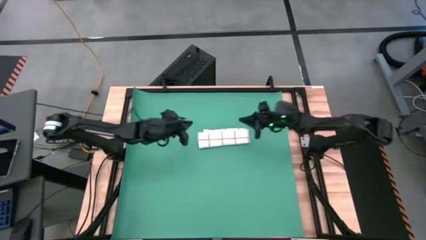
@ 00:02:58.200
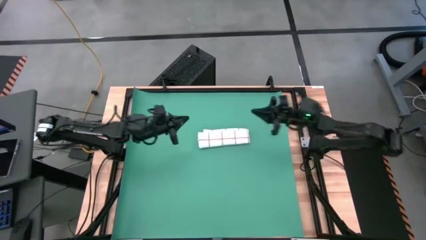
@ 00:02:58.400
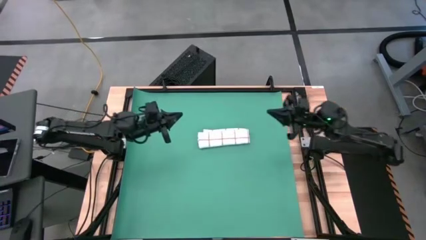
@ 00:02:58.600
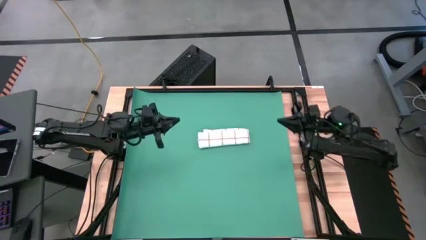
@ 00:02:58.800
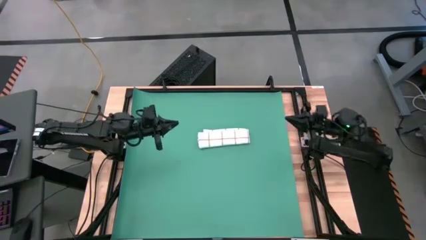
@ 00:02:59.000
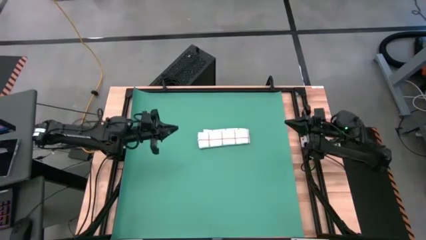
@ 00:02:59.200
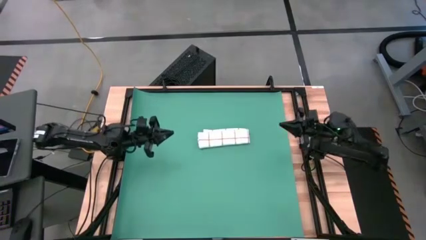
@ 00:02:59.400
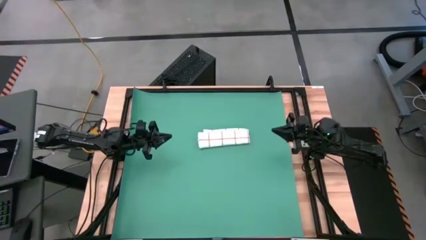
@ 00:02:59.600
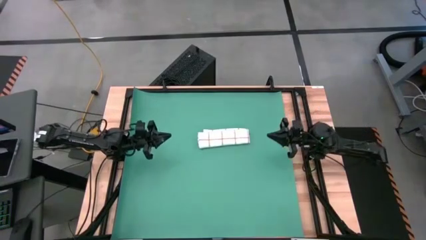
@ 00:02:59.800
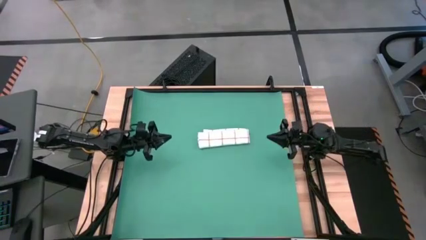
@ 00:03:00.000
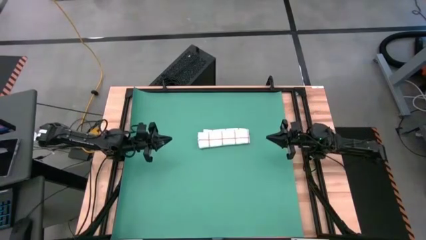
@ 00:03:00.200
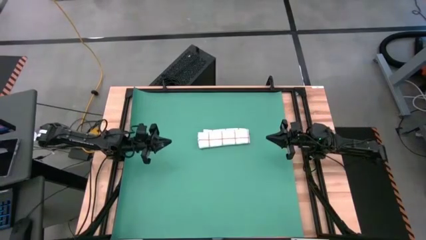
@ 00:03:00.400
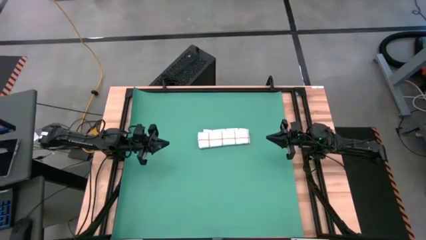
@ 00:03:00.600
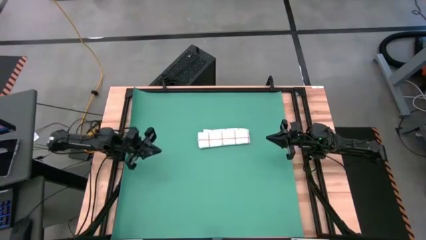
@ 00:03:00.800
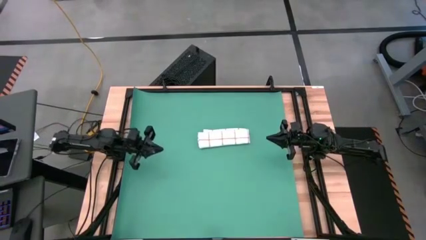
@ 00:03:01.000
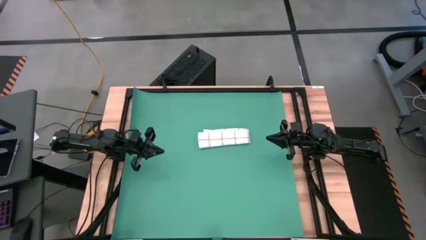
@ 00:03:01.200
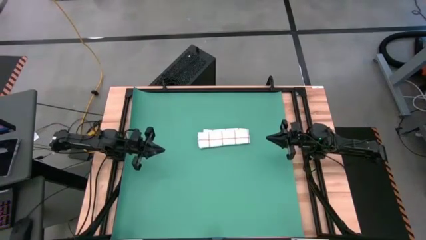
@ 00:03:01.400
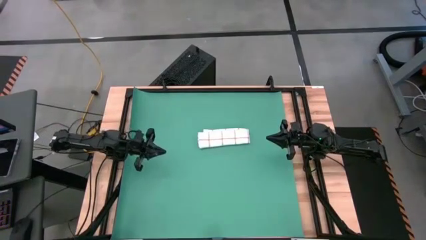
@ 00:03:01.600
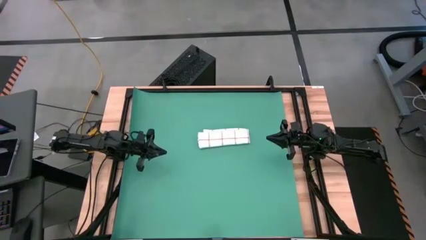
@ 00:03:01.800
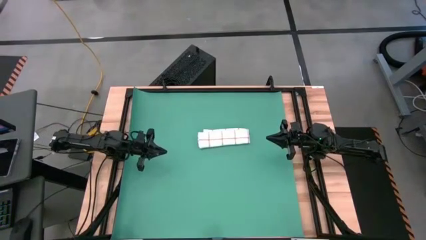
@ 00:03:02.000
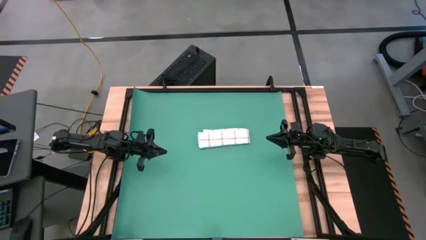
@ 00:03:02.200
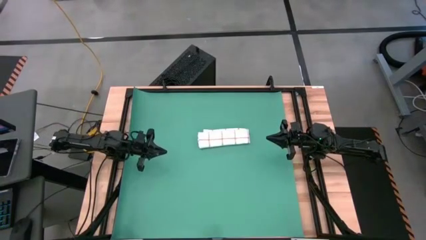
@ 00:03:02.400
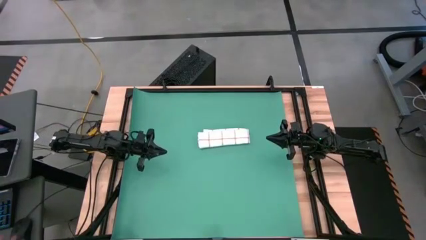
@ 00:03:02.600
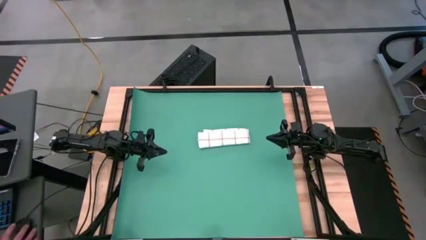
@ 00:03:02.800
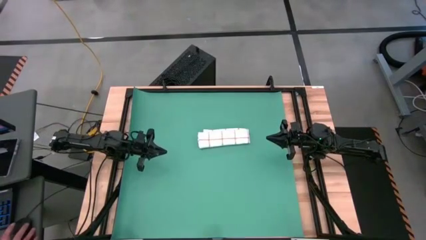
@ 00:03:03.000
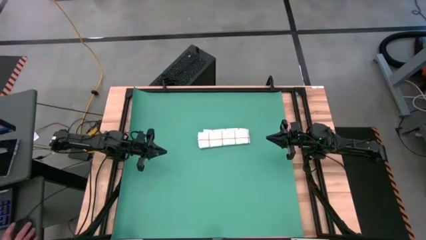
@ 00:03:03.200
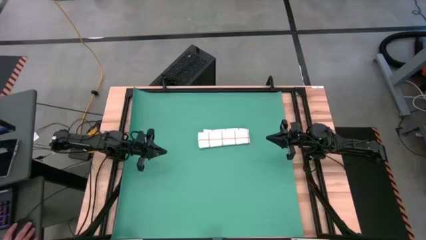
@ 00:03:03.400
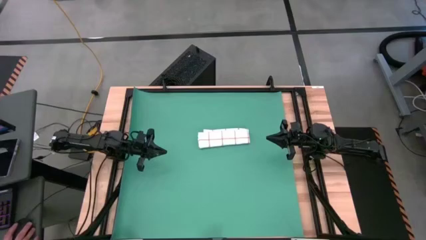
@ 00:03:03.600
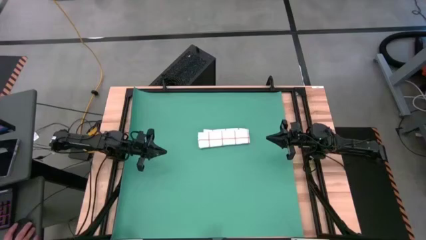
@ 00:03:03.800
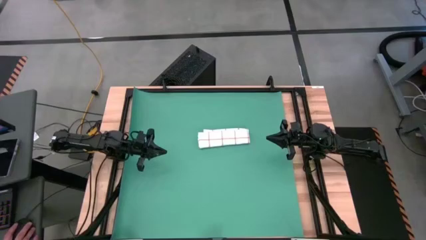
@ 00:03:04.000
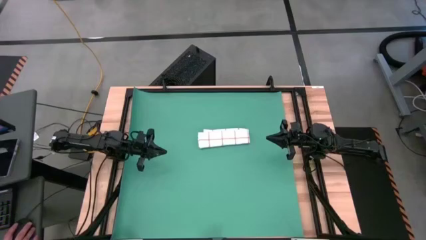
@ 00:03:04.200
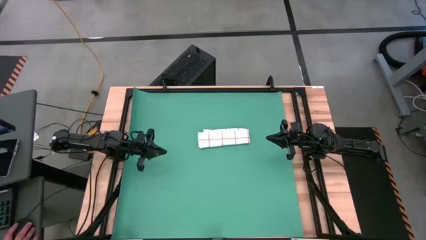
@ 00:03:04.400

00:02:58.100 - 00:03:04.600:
Task: Roll towel
Return to Home Position

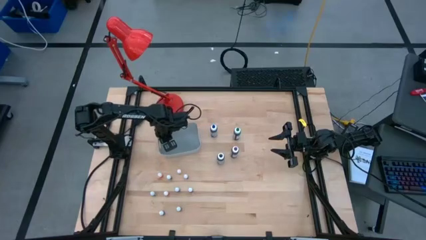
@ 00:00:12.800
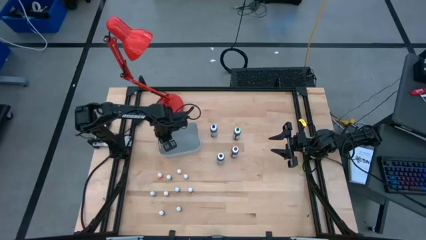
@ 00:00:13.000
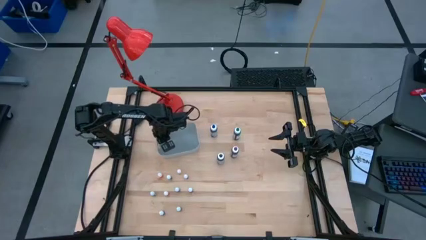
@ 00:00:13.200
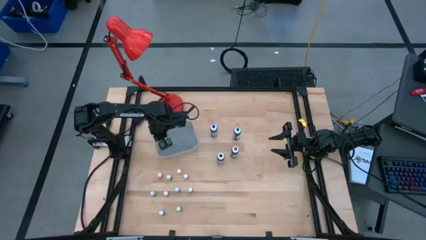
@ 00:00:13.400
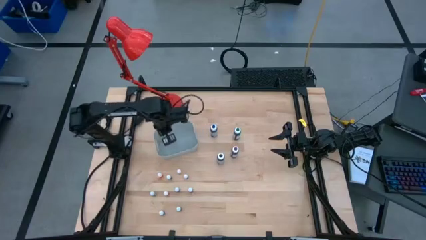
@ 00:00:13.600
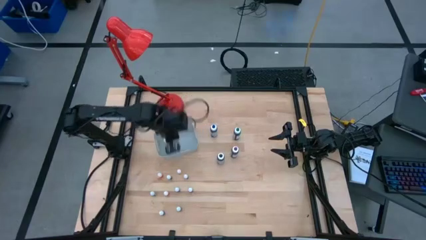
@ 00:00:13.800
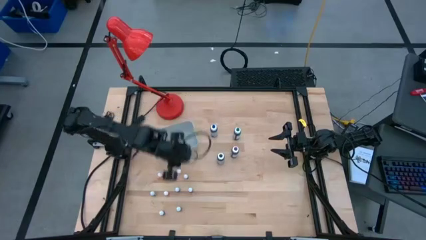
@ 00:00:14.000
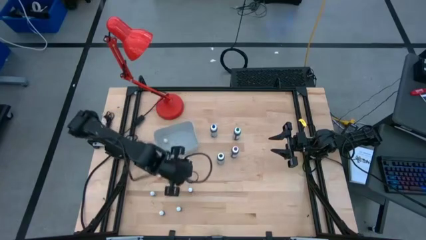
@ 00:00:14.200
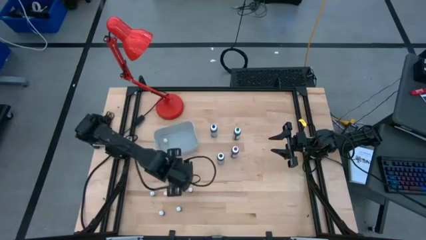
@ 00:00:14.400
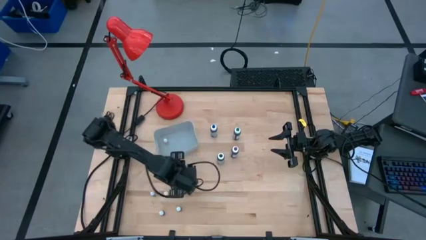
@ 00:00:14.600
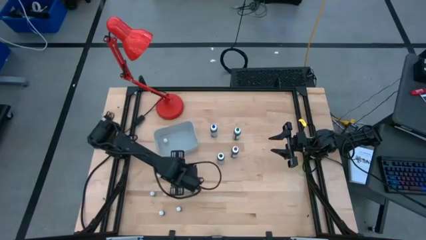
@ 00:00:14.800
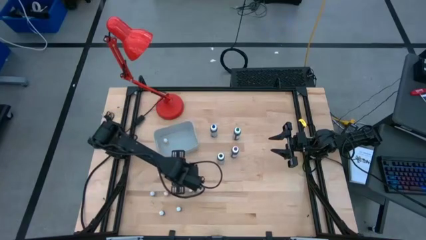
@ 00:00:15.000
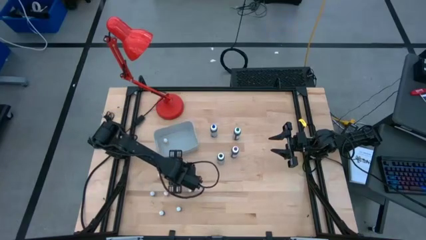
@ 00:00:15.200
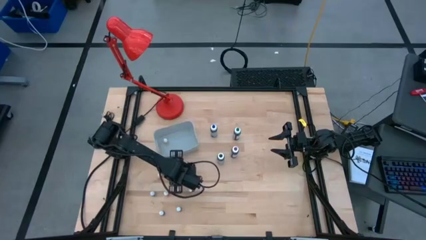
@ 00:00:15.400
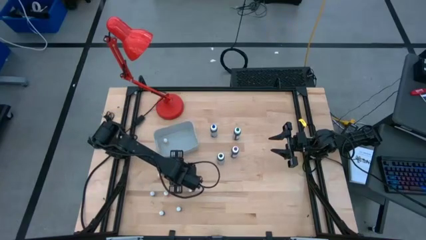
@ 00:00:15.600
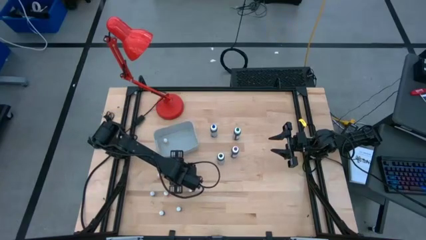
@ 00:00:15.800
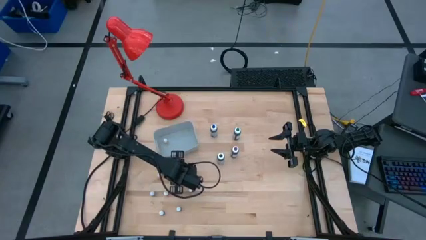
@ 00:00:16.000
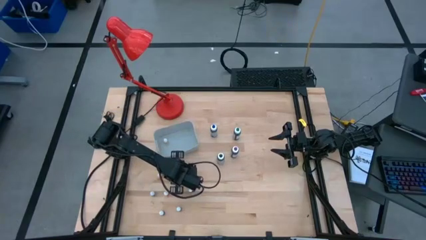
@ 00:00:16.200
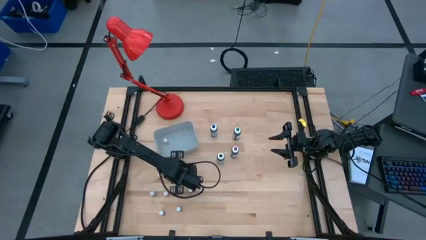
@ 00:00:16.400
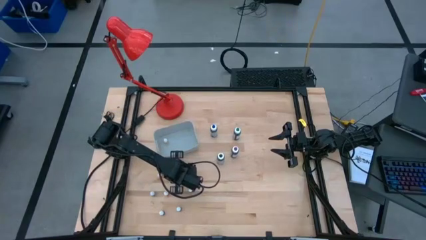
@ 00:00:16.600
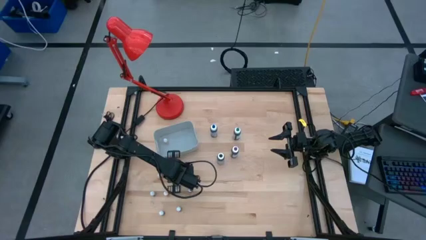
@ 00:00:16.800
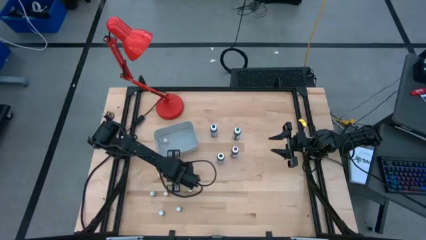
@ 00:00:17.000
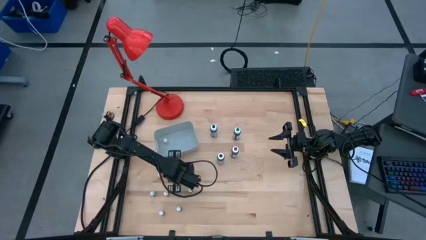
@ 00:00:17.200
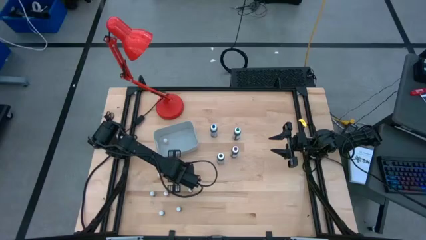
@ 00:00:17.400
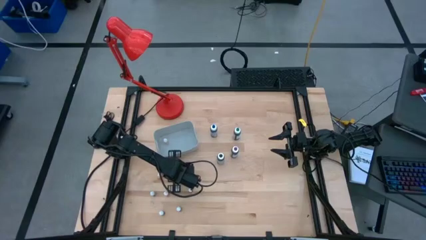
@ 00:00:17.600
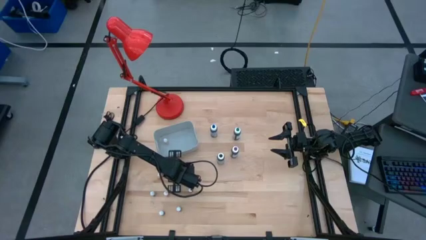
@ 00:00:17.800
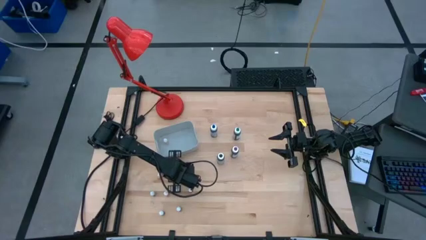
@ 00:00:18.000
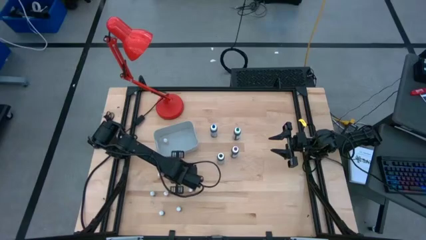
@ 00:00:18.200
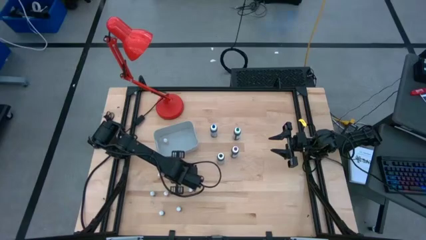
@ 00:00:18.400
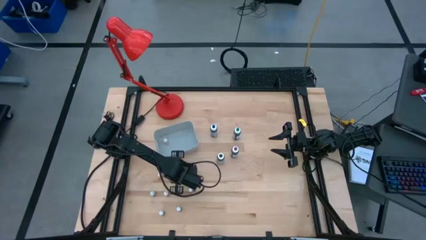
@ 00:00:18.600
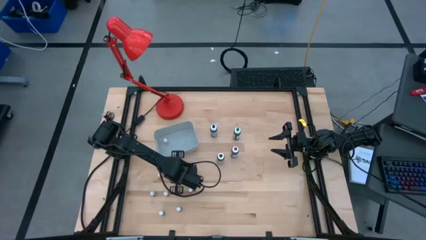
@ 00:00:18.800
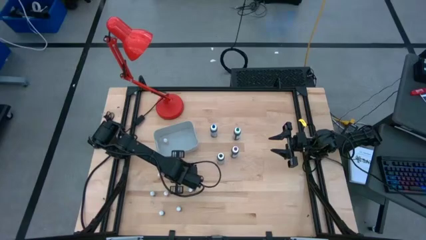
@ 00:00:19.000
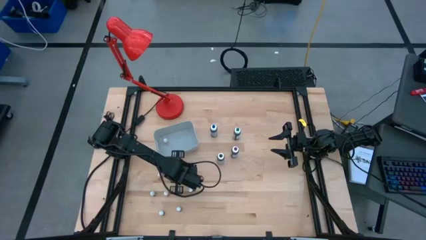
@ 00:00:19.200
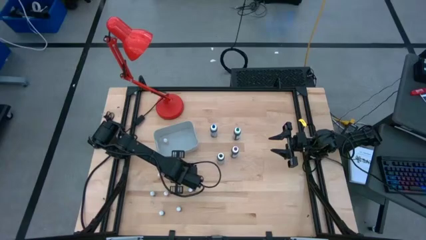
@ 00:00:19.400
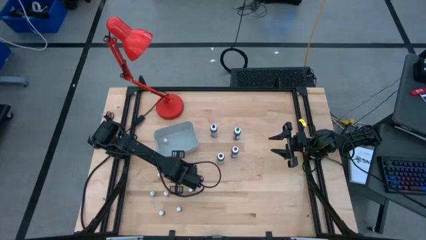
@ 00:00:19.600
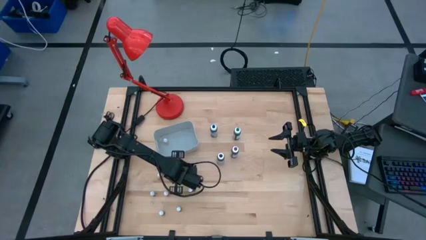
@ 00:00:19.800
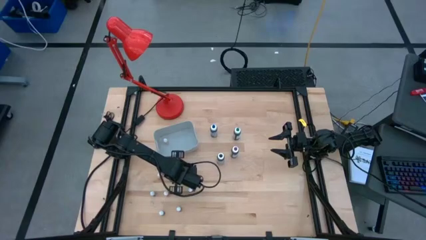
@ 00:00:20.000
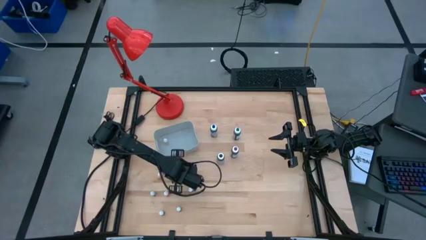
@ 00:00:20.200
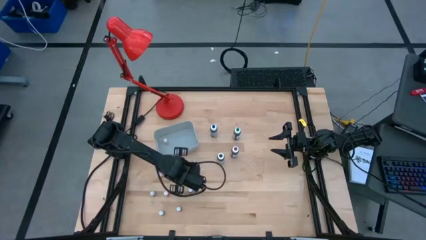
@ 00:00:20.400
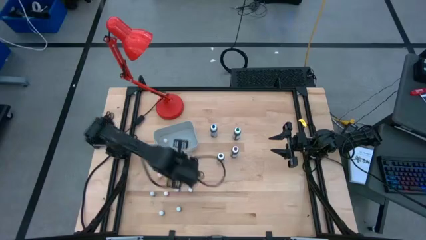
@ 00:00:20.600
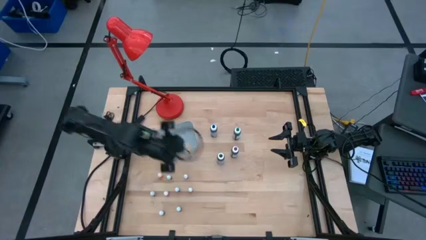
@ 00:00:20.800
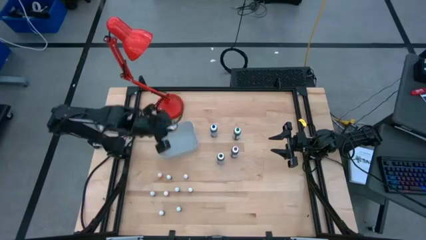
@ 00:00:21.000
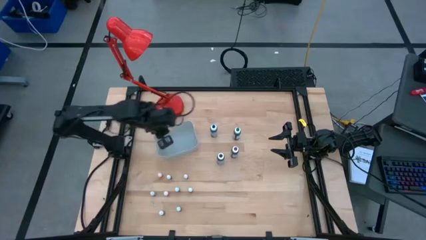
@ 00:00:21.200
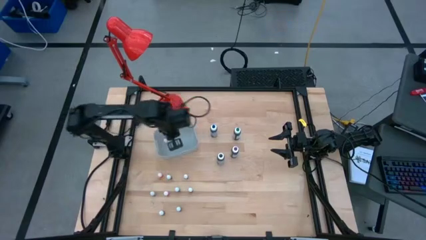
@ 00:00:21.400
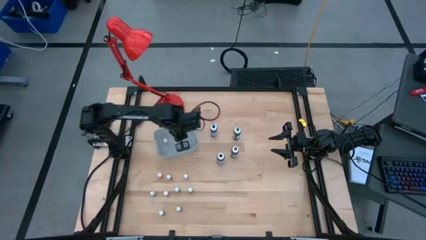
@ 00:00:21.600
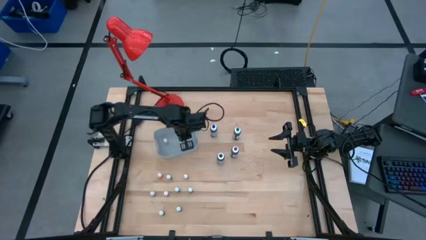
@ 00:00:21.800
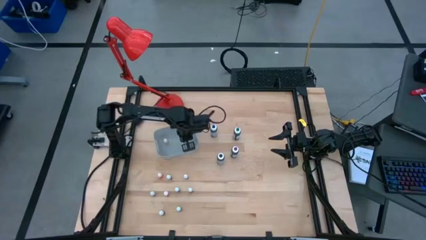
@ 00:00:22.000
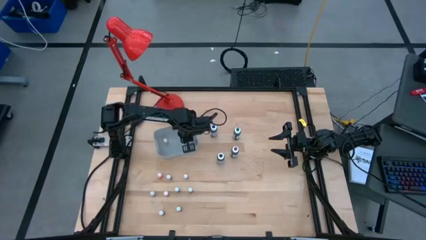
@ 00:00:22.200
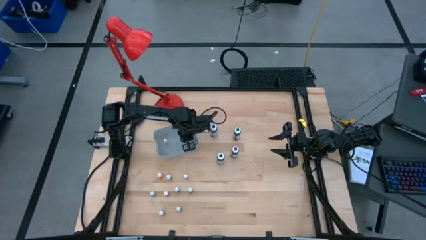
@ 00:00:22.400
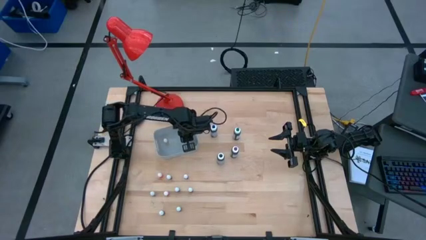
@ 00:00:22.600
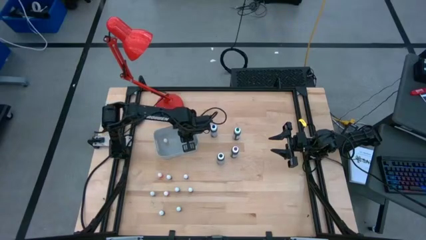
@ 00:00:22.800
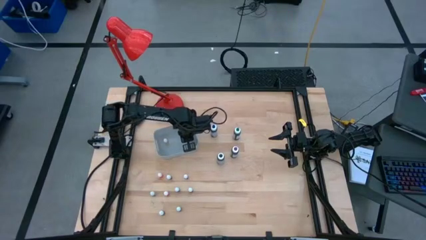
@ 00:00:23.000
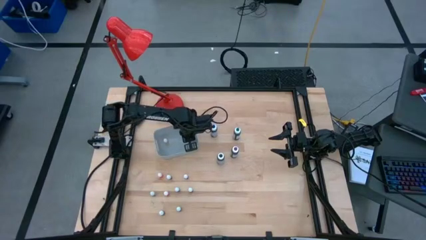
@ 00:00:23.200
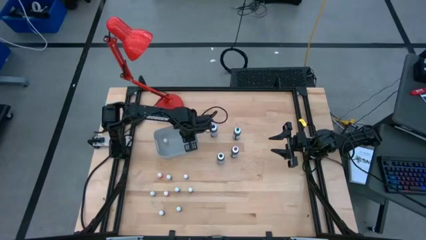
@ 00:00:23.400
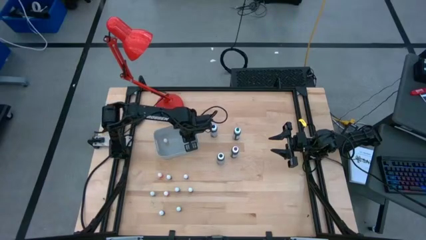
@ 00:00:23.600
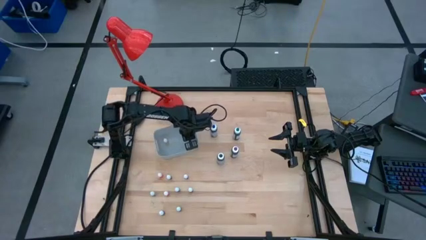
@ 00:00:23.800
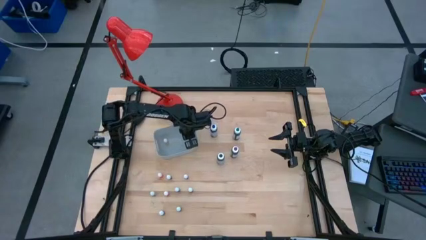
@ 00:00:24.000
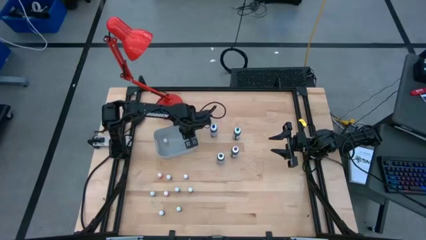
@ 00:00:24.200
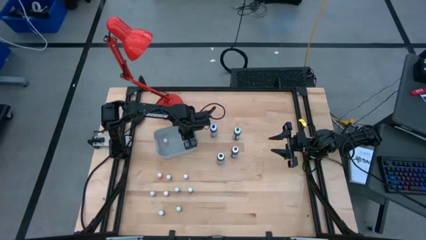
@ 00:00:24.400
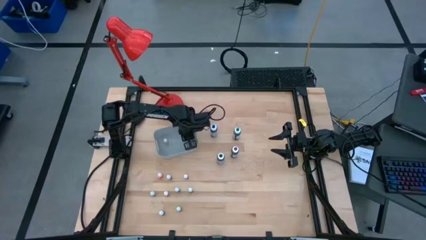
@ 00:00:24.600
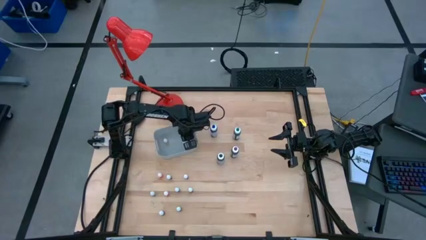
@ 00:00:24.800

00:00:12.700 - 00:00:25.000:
Task: Pick & Place food coloring
Put the top small orange coloring bottle into the gray container
